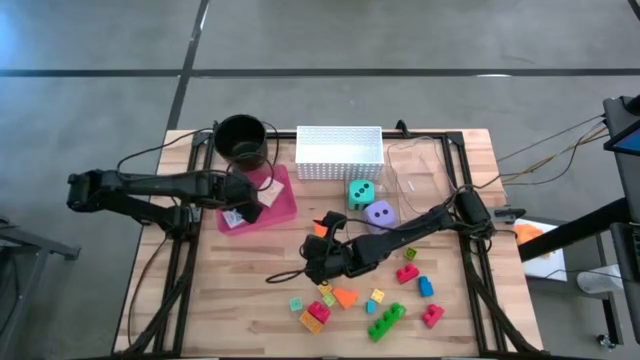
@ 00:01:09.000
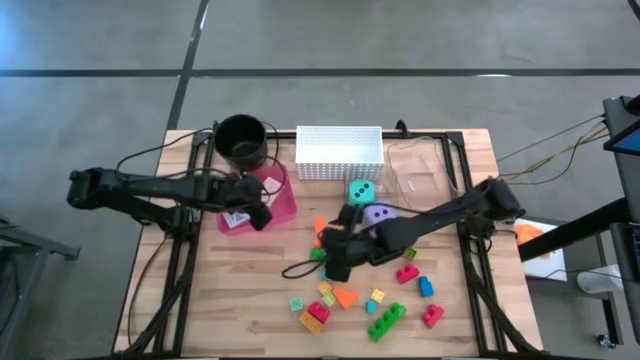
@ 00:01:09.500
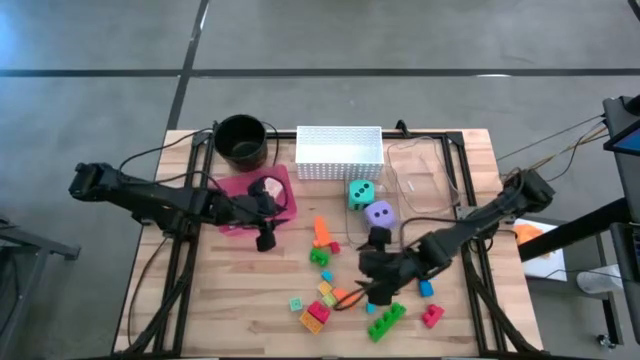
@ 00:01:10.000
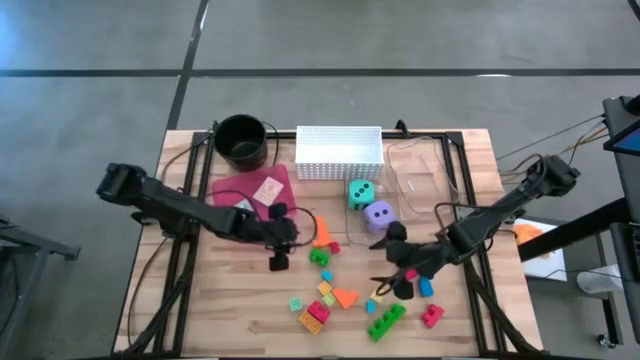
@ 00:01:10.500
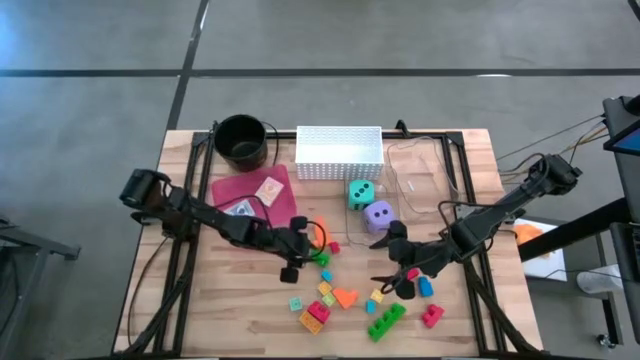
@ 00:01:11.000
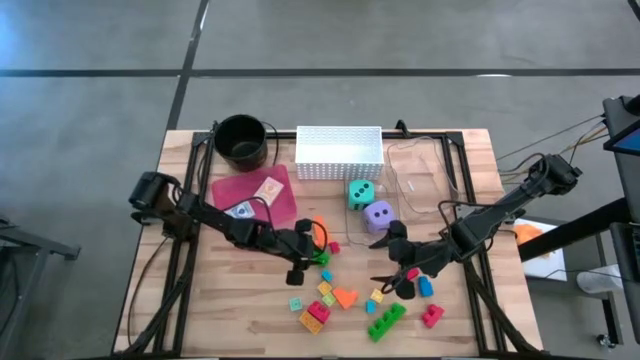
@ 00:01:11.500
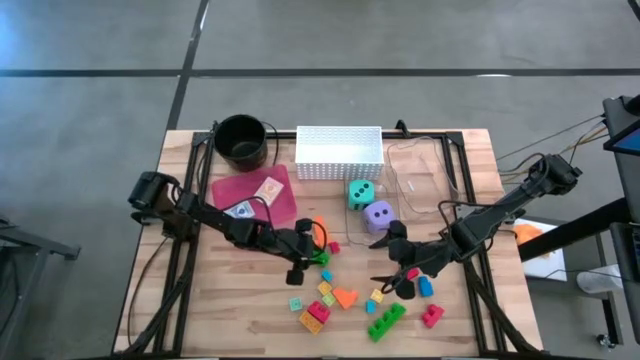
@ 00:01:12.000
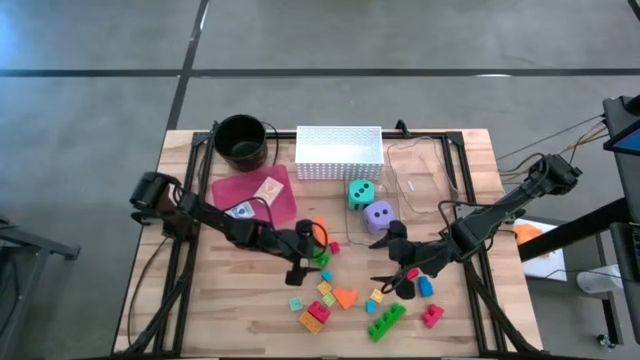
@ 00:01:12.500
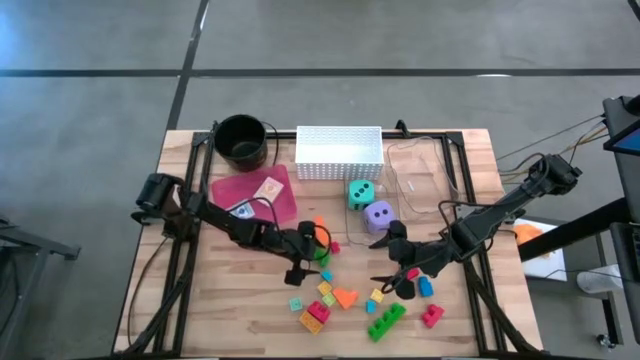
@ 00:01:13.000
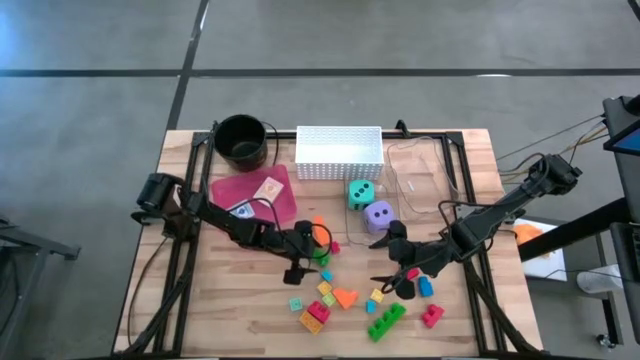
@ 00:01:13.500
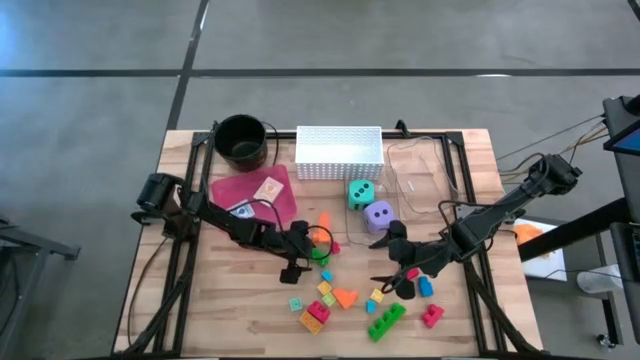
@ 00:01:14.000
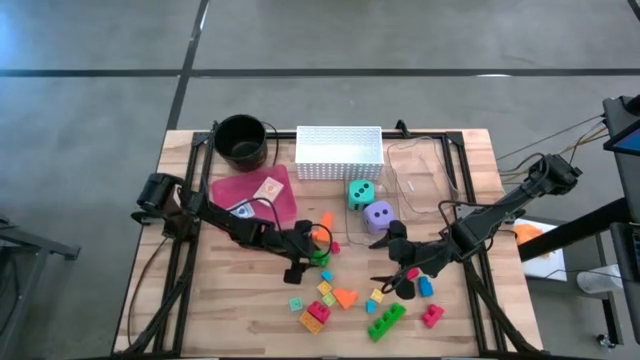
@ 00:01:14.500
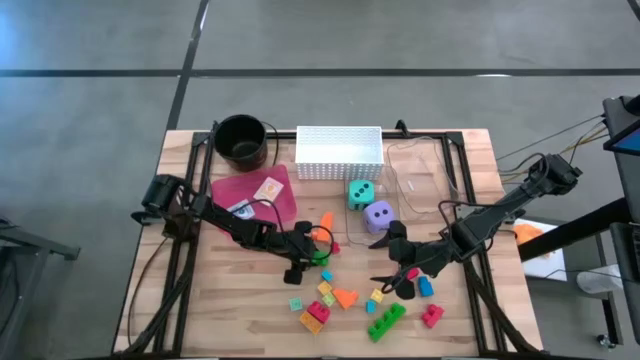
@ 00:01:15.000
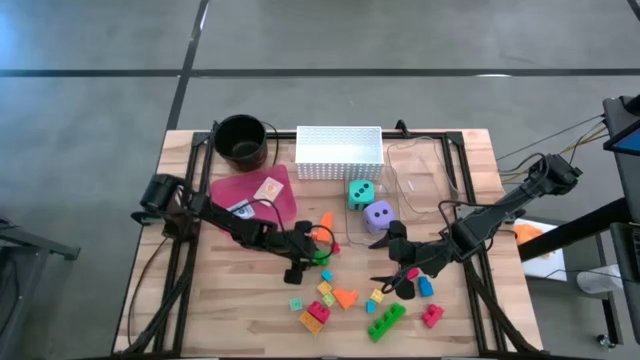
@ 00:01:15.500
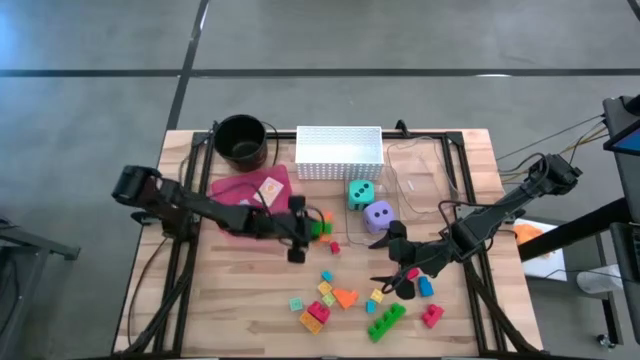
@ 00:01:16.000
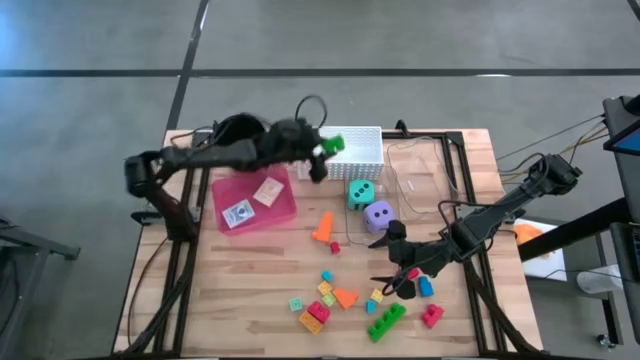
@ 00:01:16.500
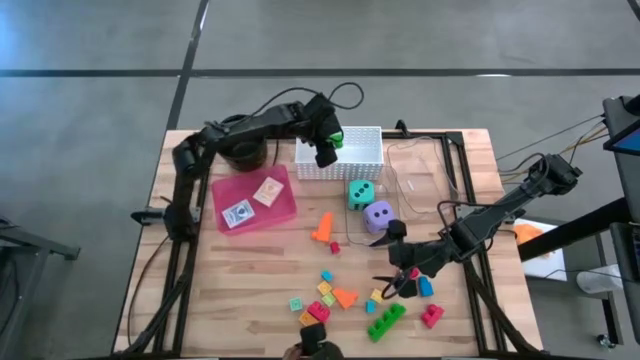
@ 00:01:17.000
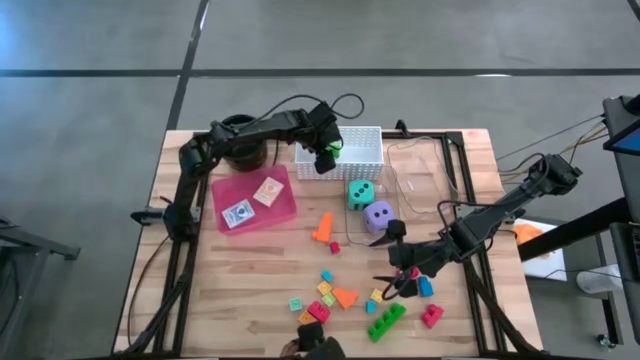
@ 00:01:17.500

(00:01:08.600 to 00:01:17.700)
Task: Pick & Place Toys
Put the top large green game piece into the white bin

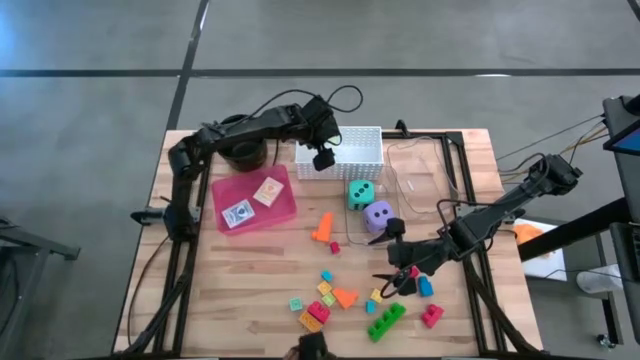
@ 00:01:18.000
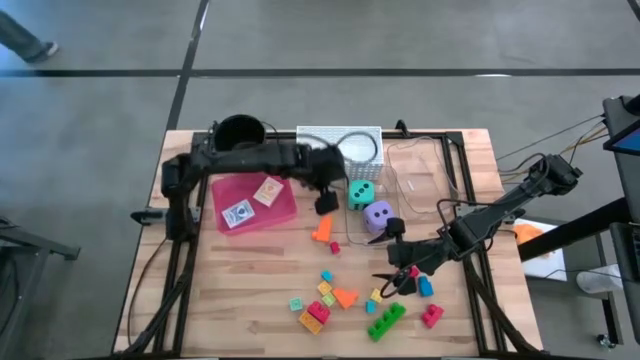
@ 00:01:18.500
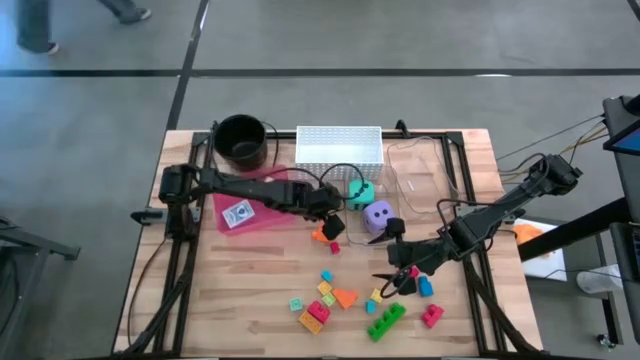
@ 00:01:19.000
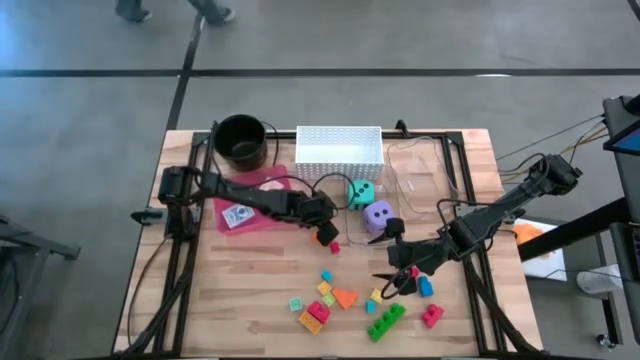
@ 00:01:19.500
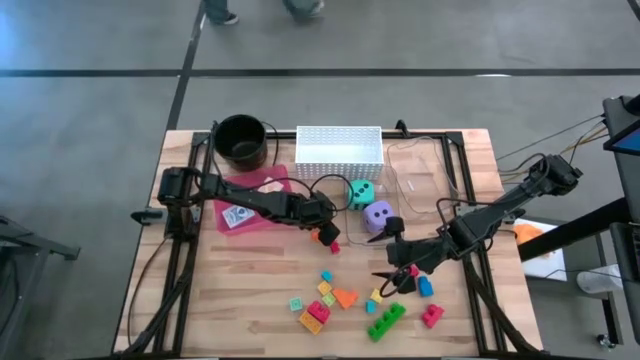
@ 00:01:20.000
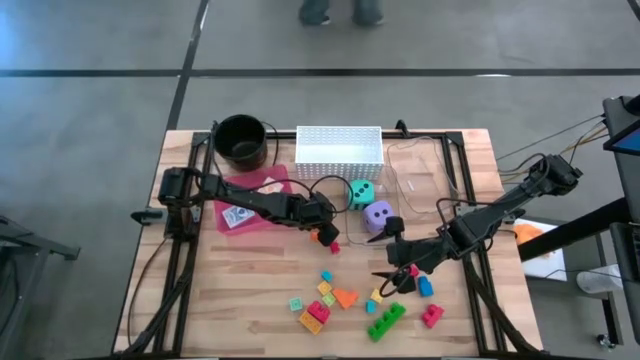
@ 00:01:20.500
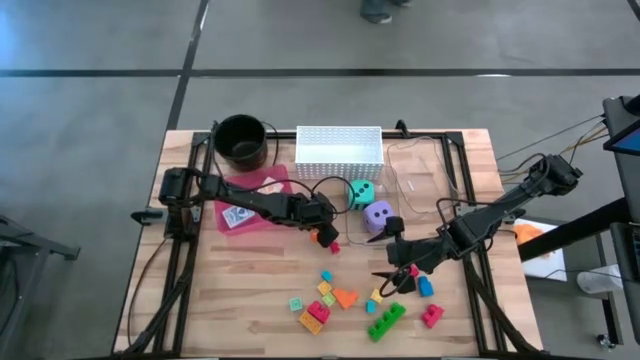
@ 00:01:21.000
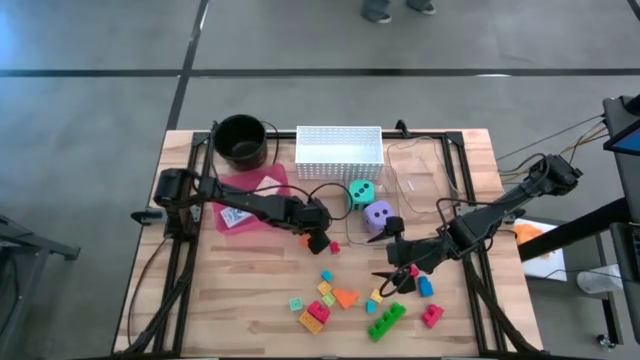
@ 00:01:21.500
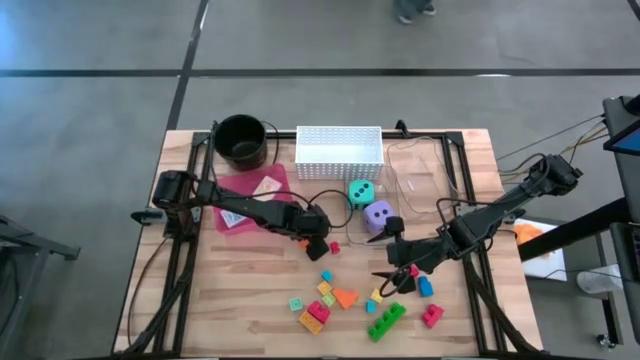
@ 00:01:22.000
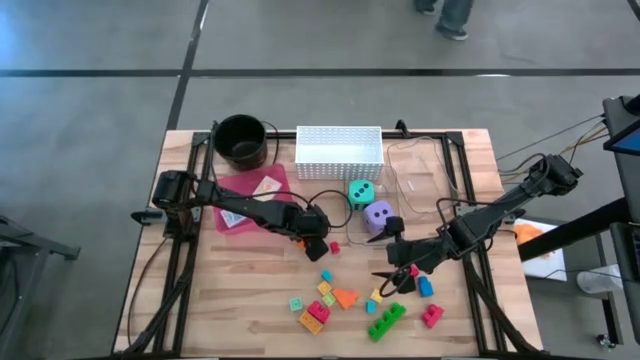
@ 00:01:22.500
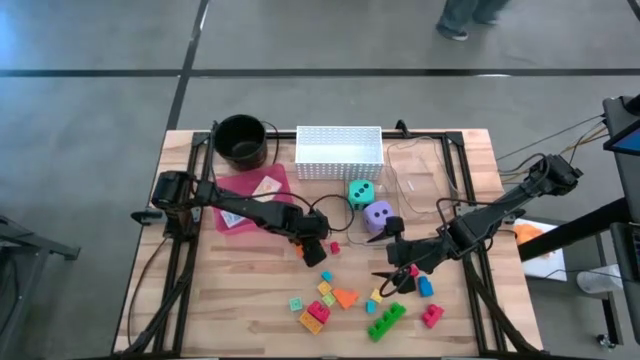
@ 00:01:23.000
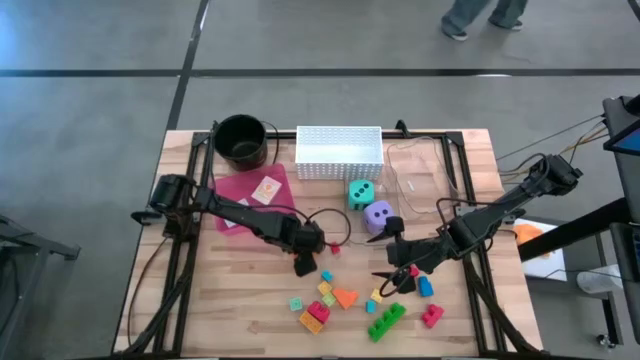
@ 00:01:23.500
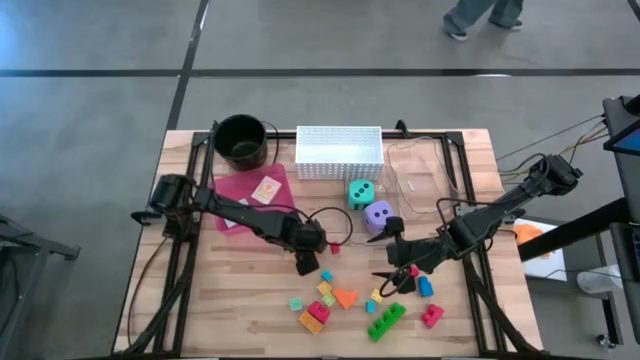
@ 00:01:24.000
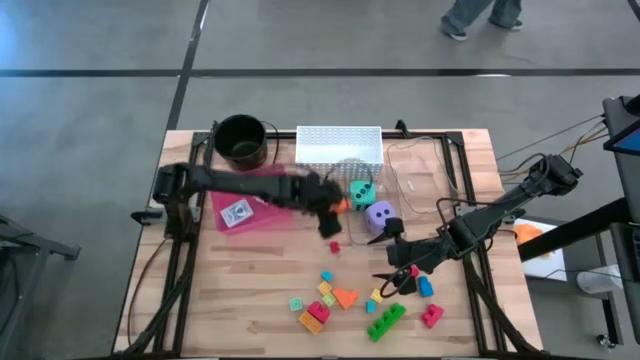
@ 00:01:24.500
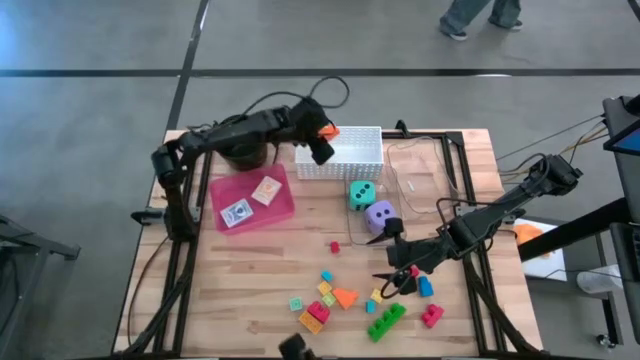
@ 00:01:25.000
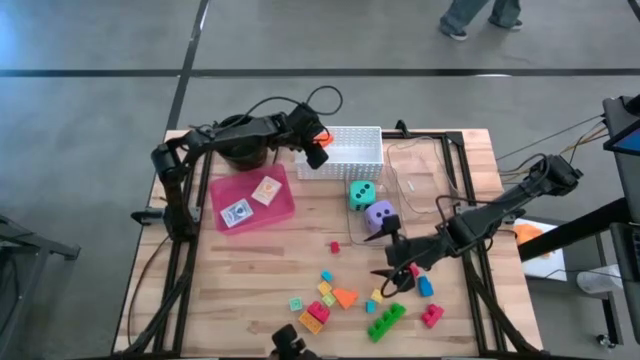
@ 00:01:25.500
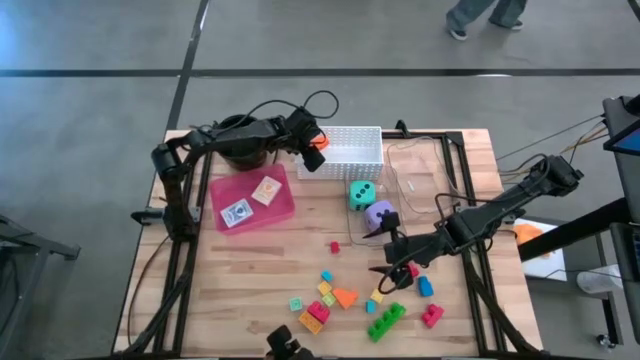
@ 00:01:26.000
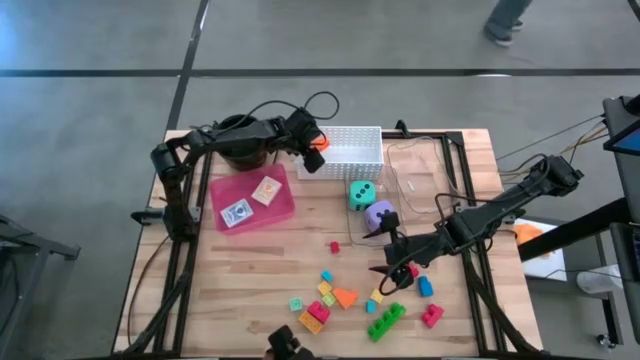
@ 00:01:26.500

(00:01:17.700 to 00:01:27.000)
Put the top big orange game piece into the white bin
